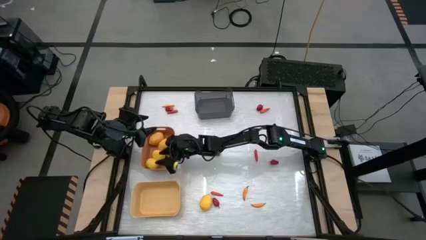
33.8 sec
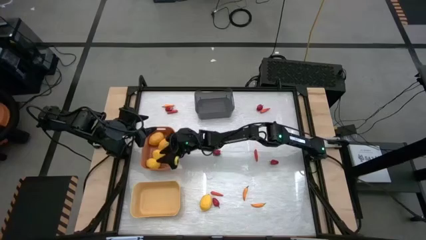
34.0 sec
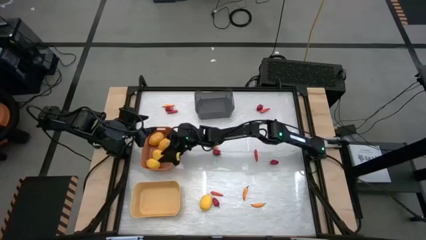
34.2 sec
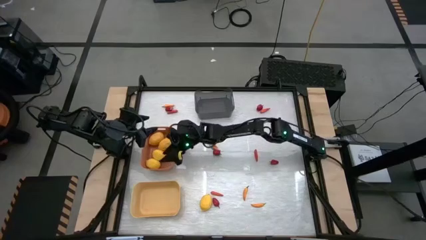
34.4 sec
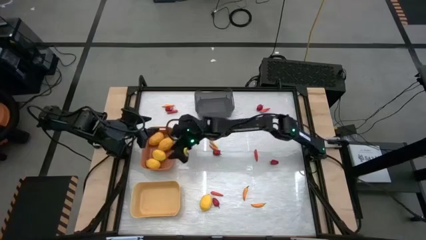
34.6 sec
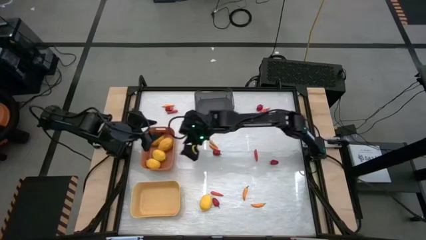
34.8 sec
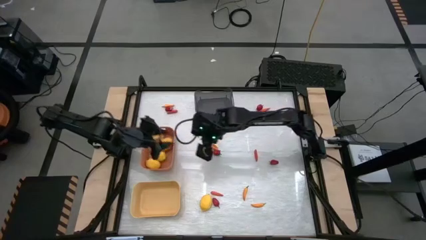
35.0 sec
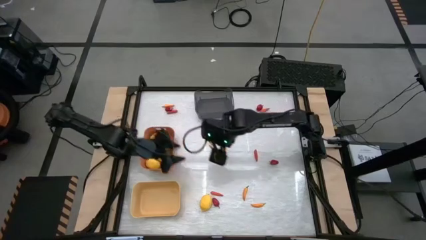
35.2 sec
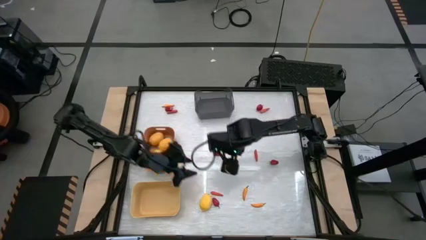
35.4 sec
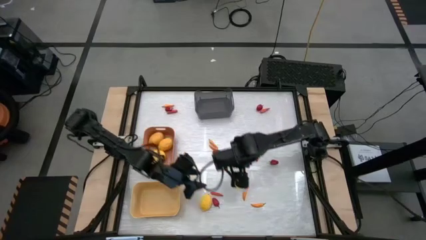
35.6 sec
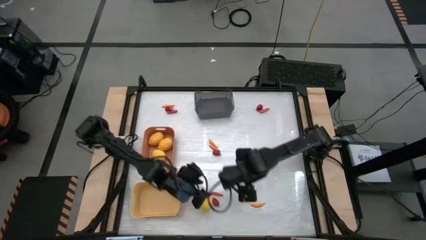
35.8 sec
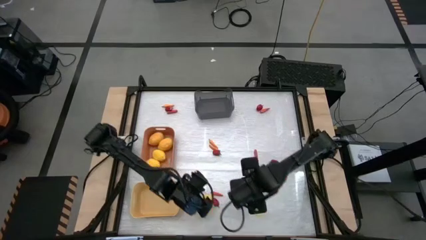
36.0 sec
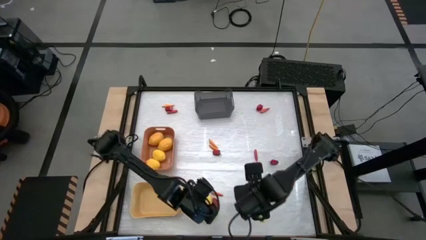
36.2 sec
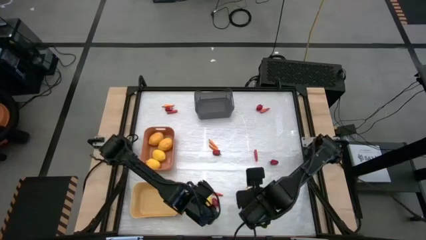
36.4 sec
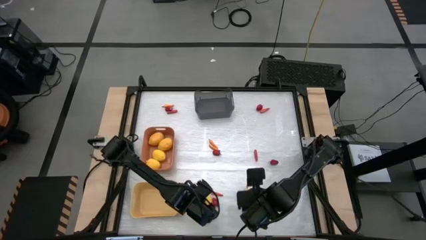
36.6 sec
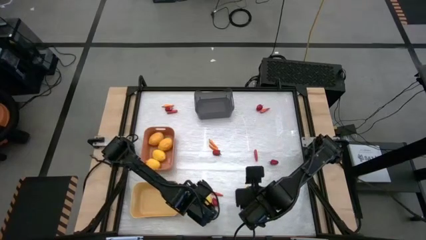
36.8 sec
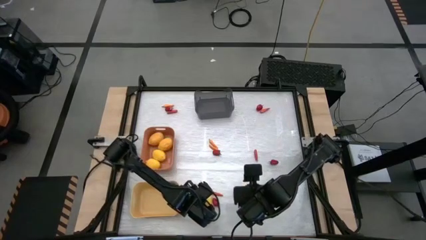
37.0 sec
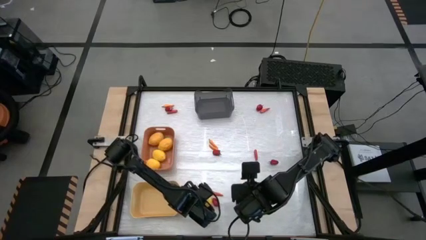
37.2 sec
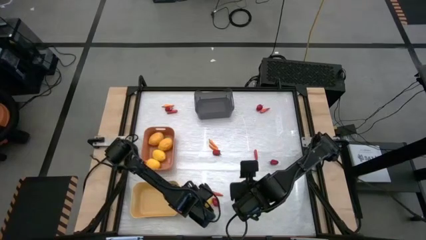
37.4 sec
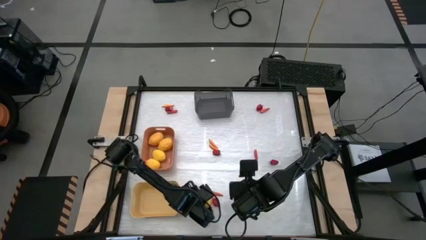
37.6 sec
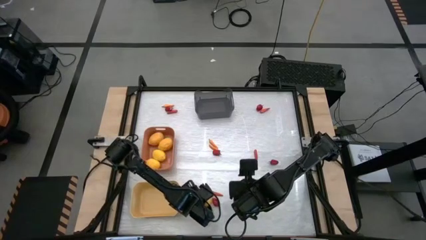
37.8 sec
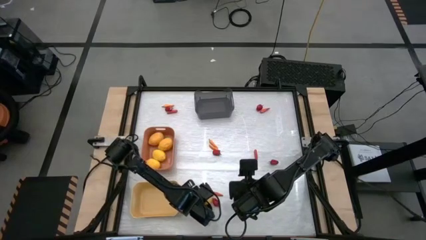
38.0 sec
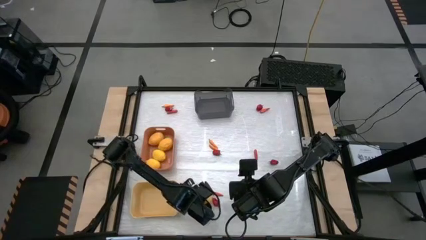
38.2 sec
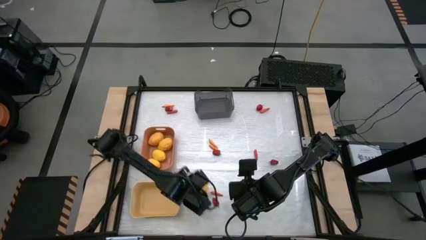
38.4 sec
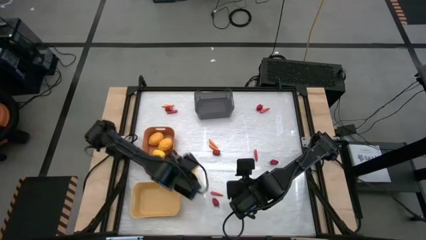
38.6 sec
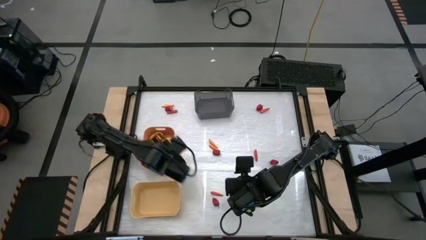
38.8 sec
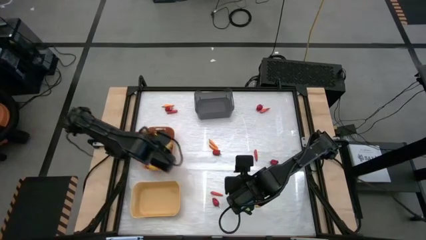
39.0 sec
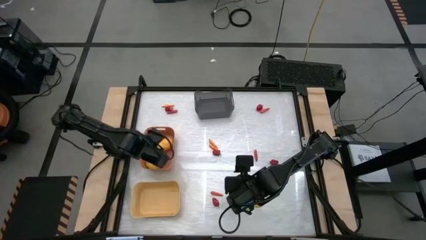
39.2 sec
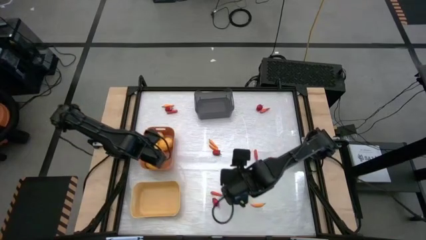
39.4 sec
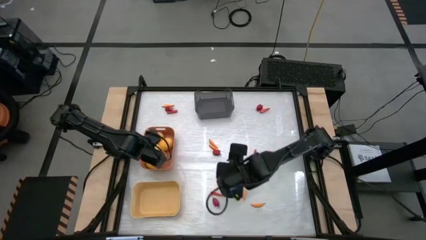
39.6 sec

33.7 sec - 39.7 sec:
Task: Sort produce into baskets
Put the yellow lemon into the orange bin

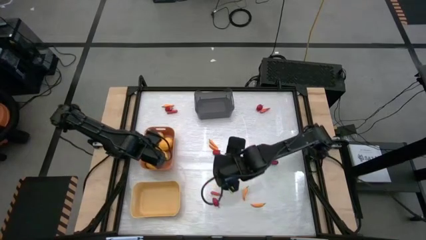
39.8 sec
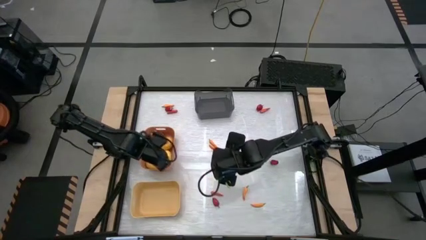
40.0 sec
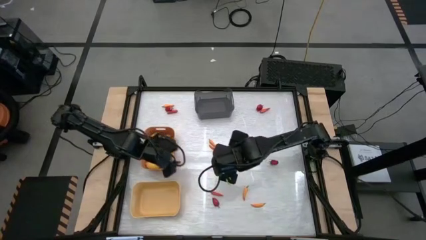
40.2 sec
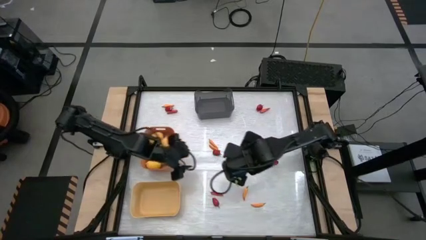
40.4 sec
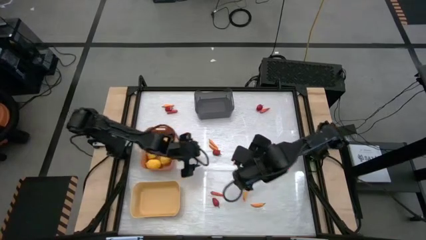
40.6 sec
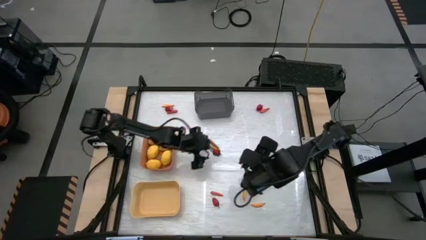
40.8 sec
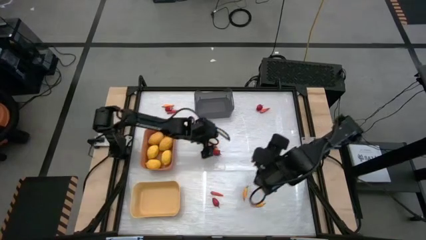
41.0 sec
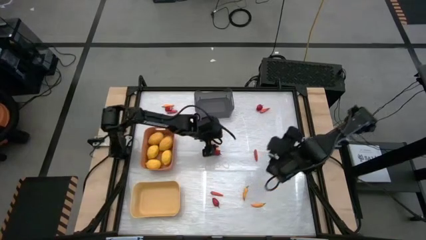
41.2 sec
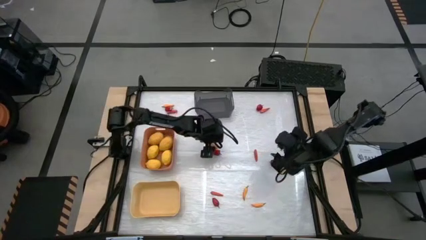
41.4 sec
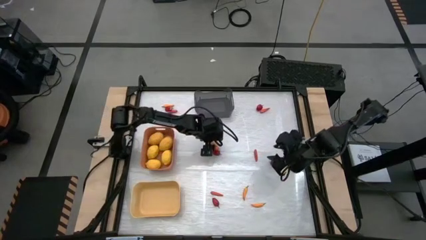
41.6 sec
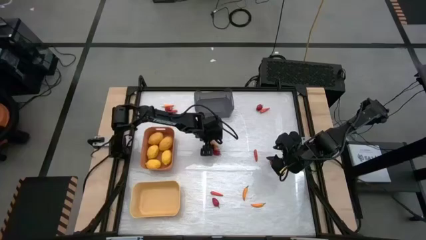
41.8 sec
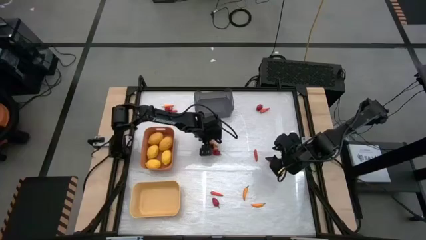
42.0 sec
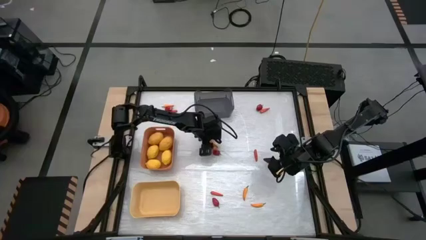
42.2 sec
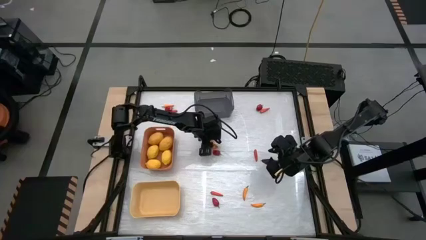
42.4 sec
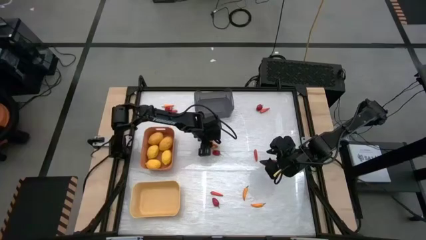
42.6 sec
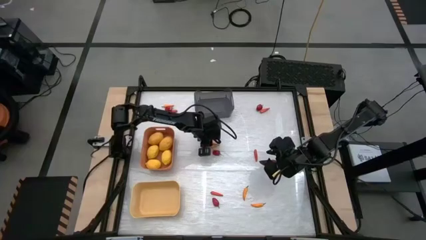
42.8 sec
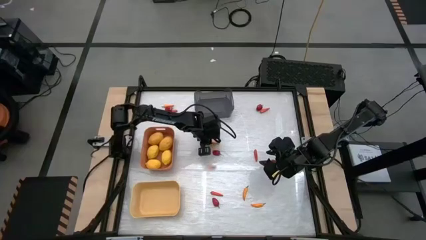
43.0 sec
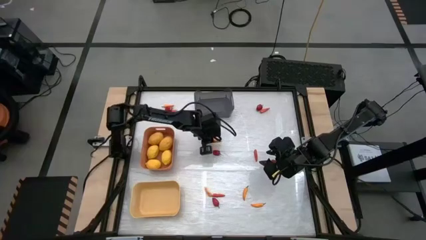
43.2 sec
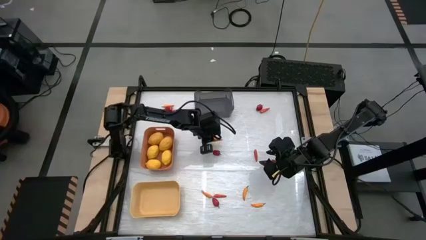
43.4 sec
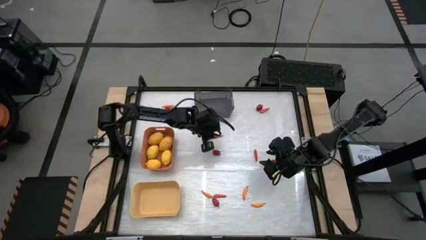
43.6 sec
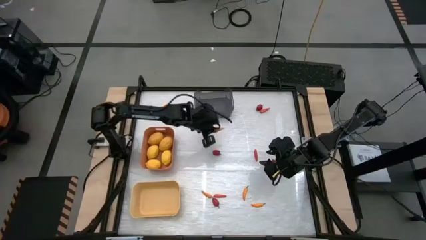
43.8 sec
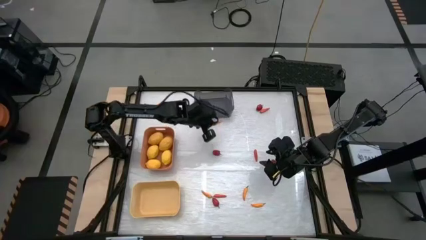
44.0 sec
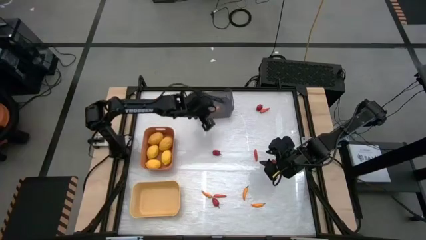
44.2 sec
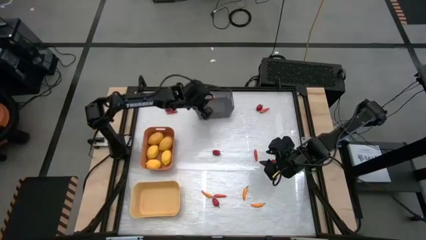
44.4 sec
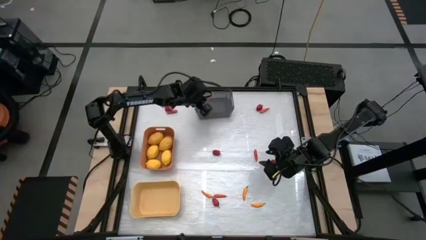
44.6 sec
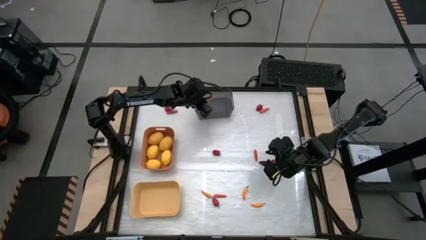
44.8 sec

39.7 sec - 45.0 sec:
Put the orange chili pepper into the black bin

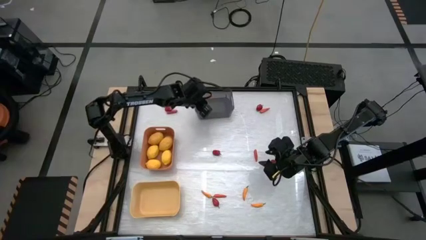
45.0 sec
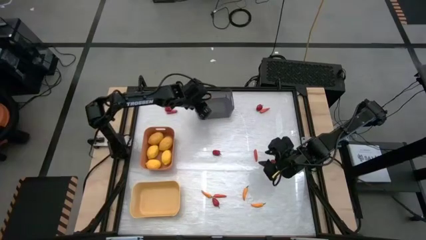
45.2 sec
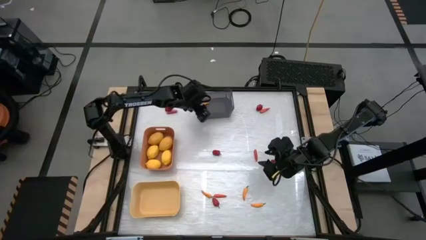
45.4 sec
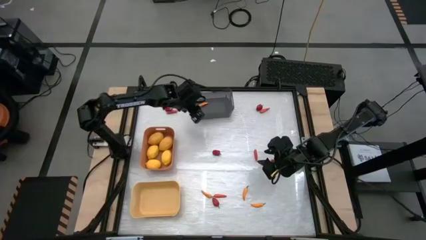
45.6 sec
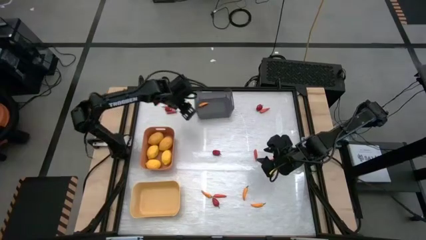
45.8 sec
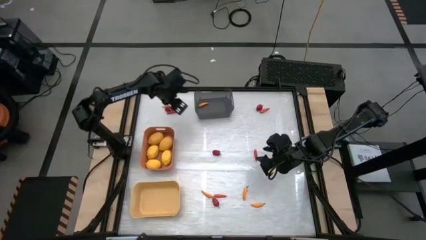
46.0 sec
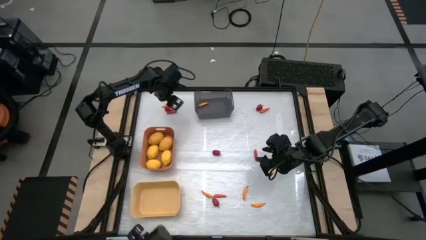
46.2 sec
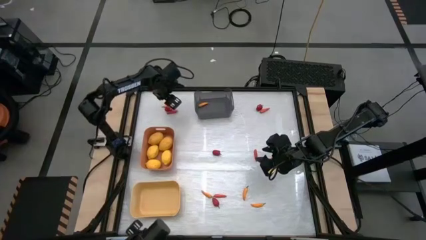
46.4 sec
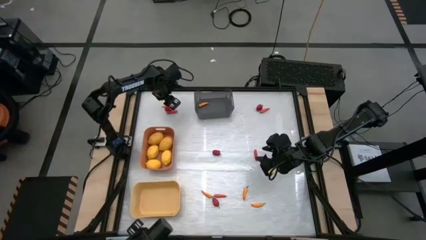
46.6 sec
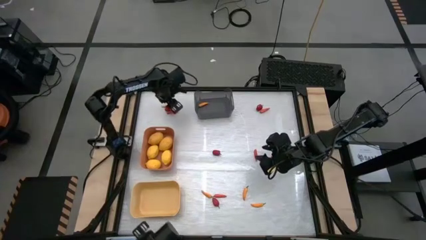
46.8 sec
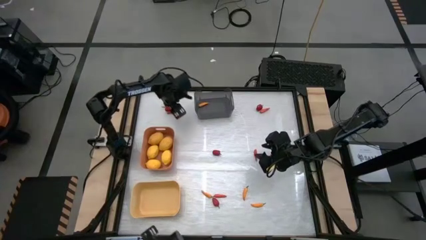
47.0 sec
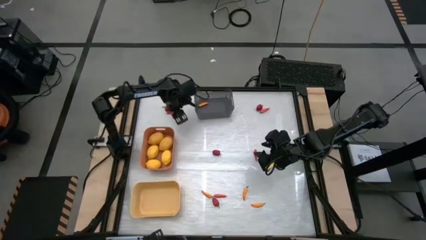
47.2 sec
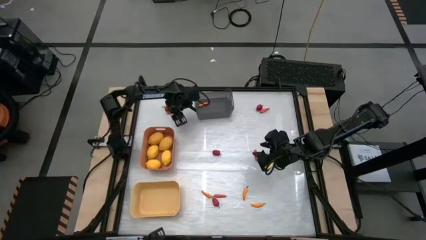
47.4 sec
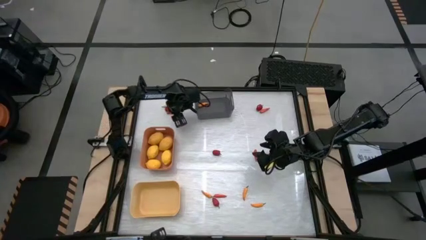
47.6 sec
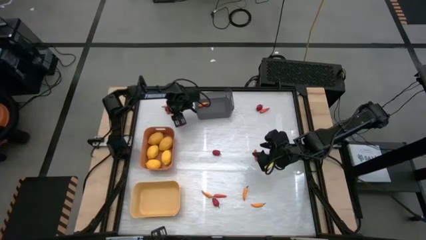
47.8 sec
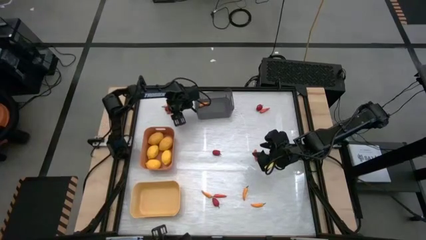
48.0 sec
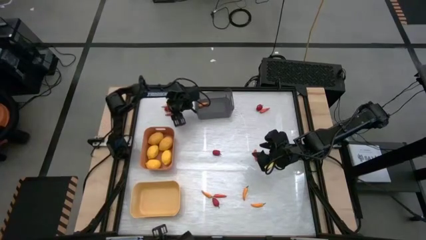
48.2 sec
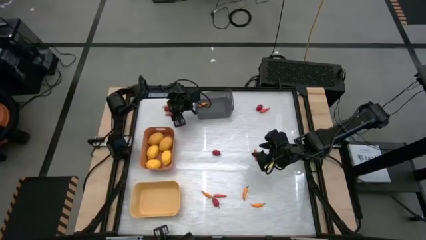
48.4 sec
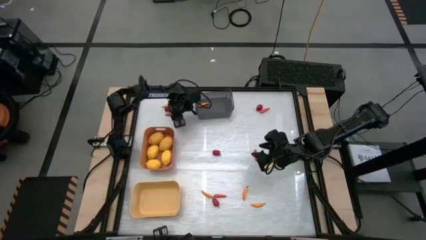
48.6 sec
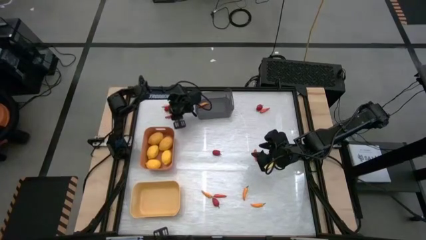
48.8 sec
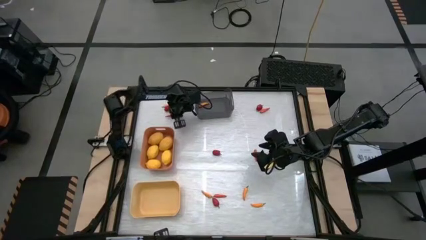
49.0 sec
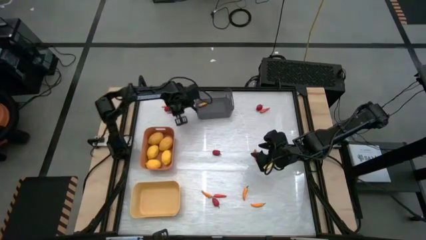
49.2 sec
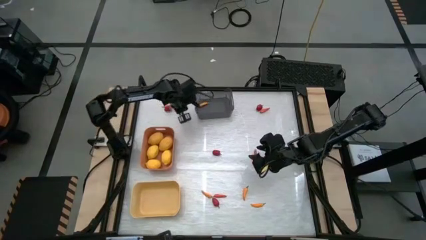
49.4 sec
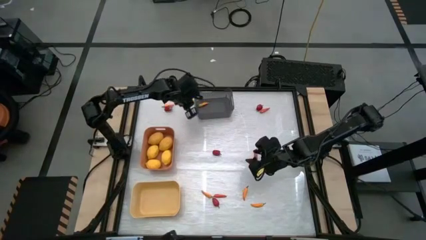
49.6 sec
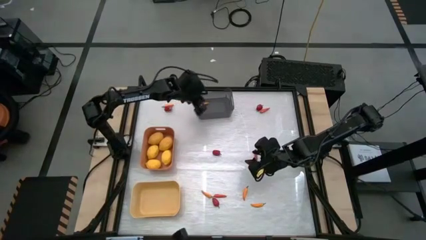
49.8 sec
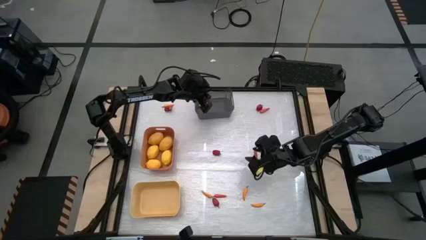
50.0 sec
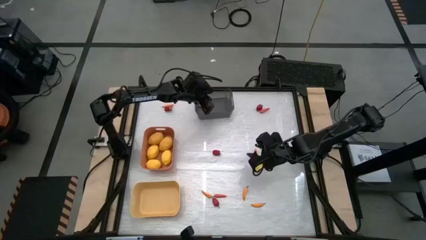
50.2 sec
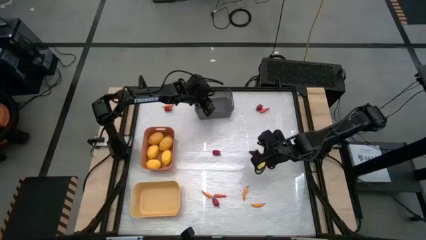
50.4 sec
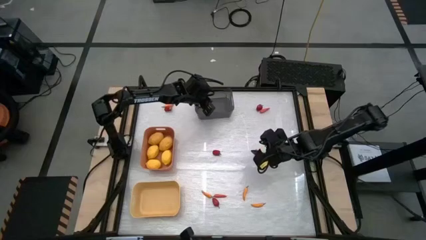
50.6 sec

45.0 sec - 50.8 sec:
Put the red bell pepper into the black bin

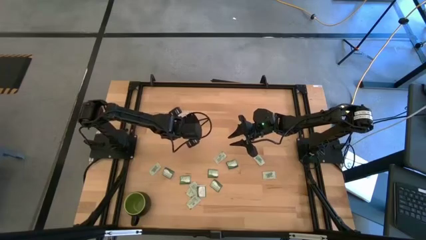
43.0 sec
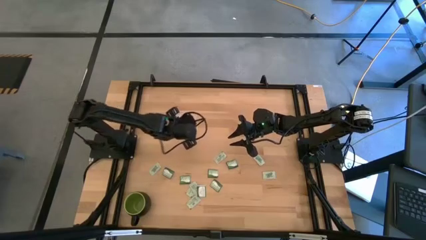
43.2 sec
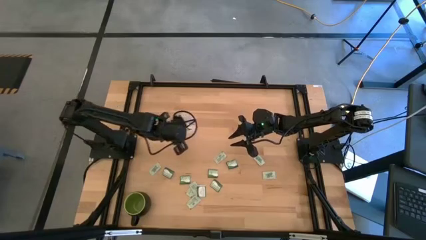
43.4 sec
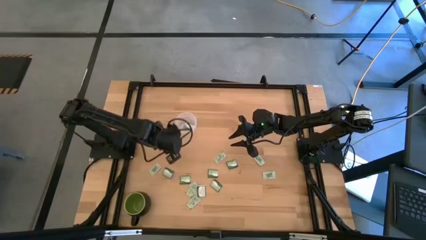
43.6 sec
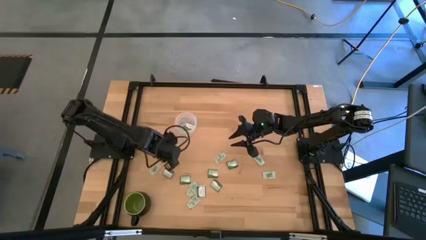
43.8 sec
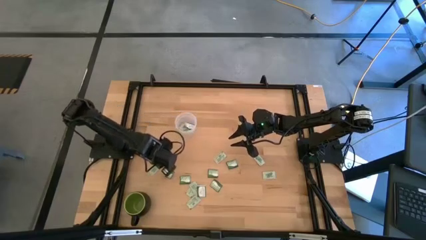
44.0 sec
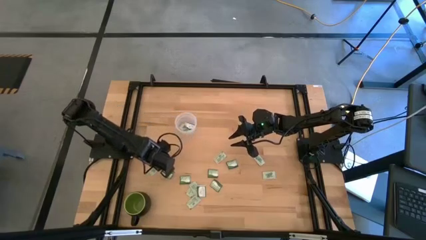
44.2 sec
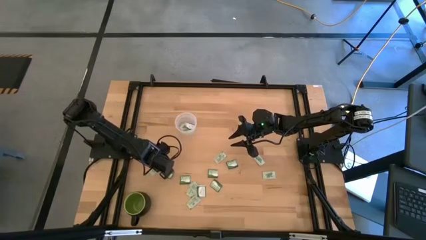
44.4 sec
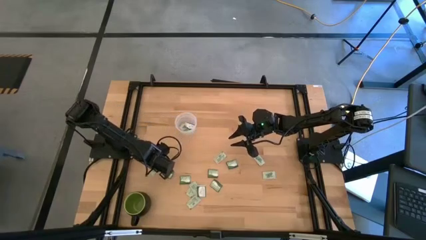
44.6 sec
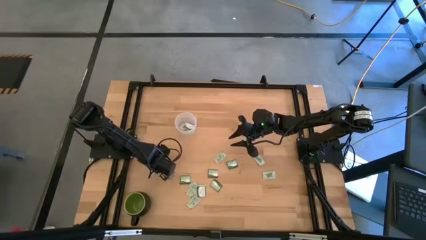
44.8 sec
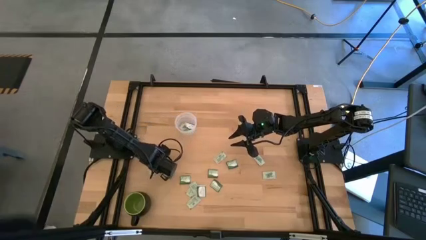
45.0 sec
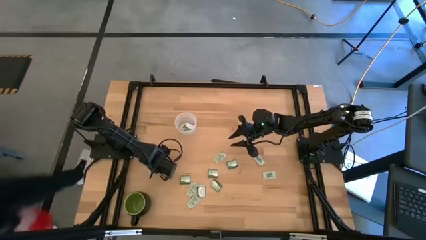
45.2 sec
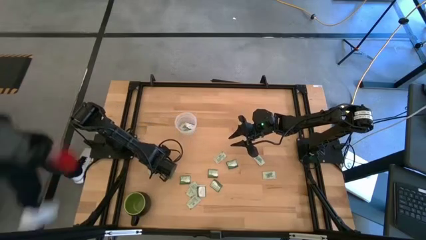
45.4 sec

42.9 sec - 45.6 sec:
Task: Pick and place Stevia / Truvia into bins
Put the light green stevia packet into the transparent container
